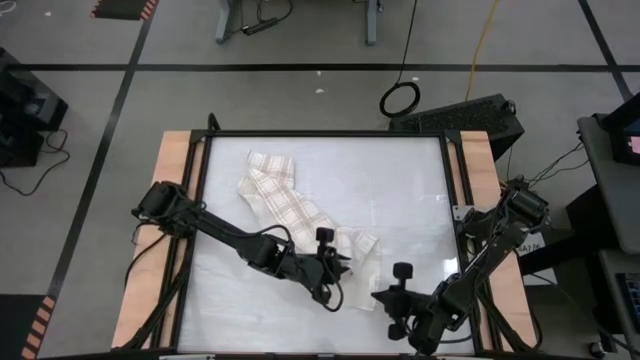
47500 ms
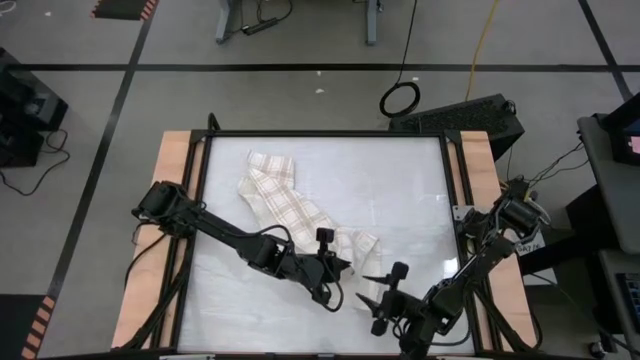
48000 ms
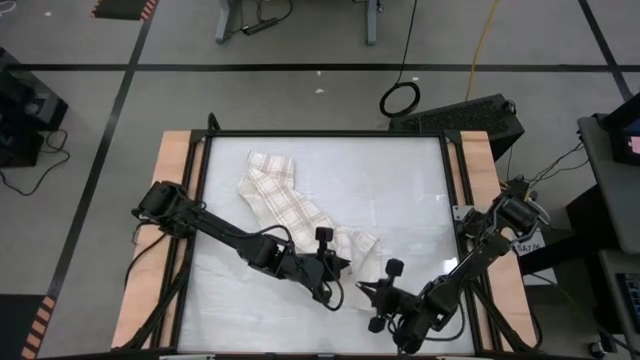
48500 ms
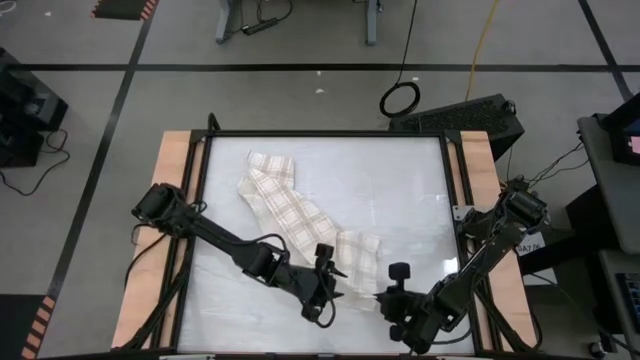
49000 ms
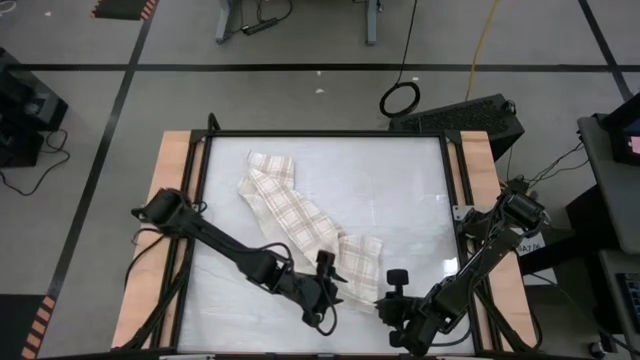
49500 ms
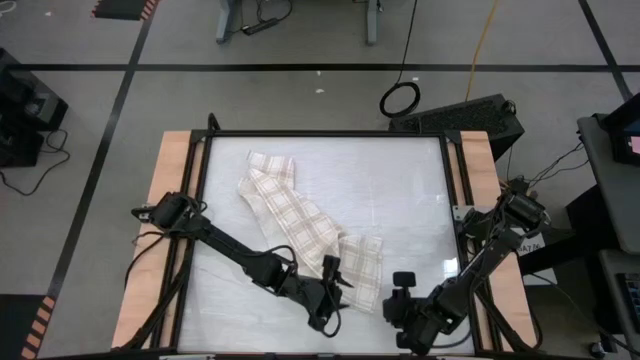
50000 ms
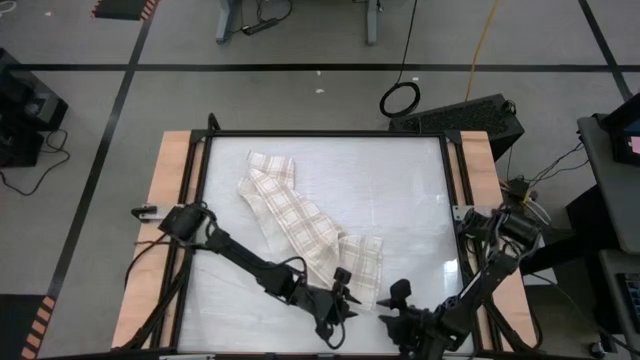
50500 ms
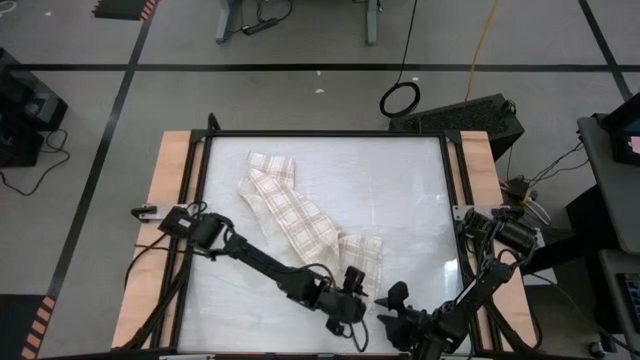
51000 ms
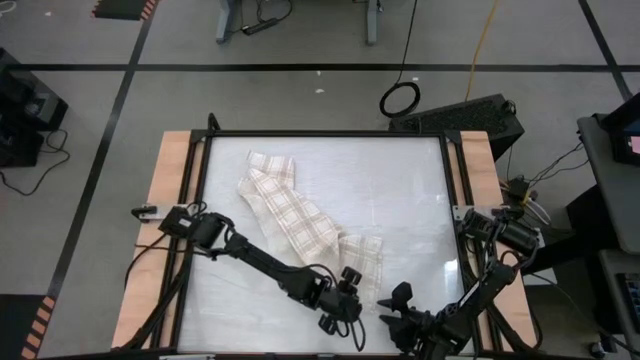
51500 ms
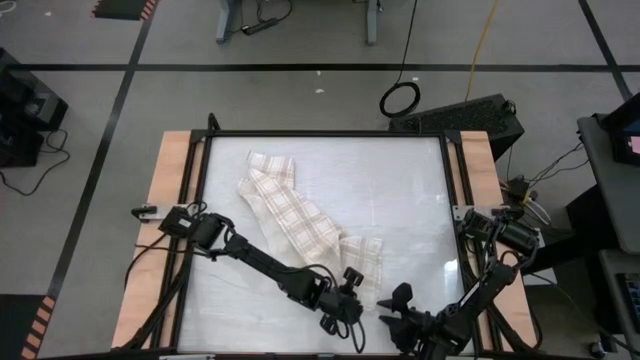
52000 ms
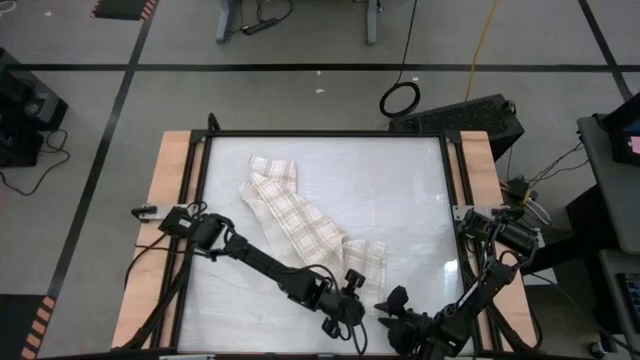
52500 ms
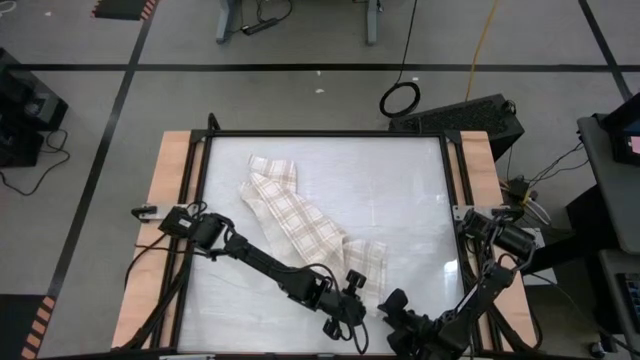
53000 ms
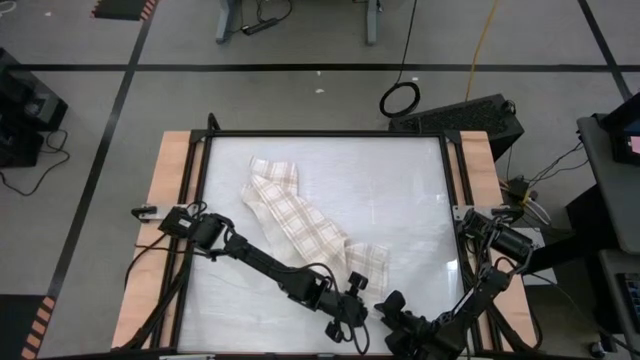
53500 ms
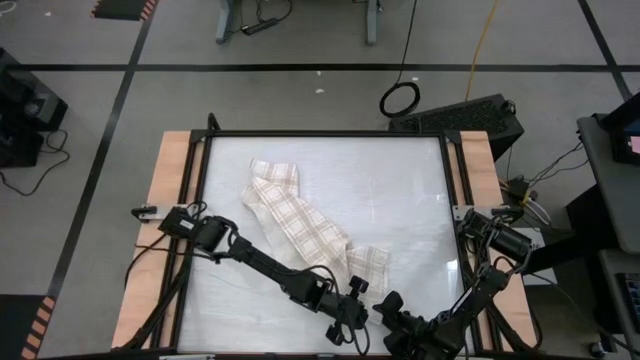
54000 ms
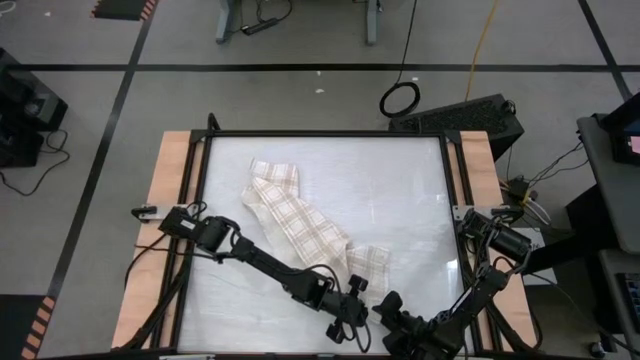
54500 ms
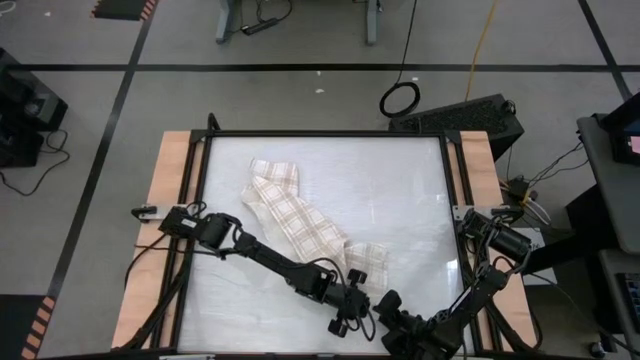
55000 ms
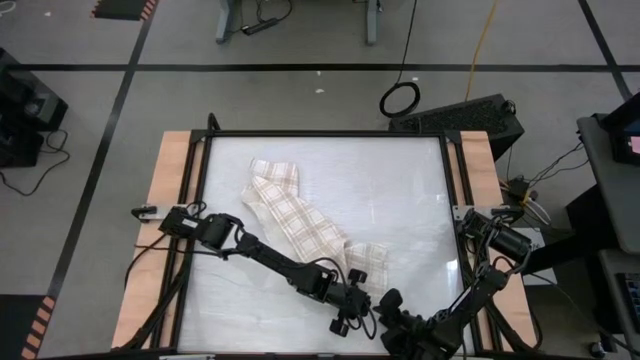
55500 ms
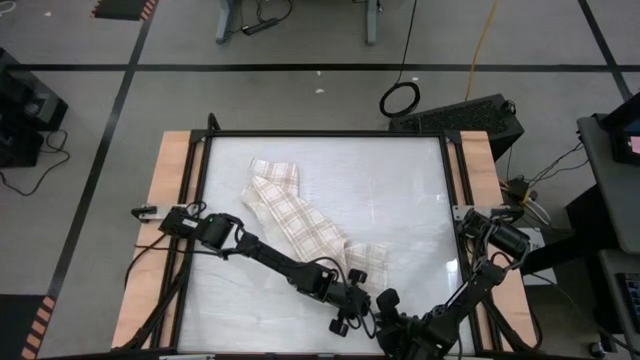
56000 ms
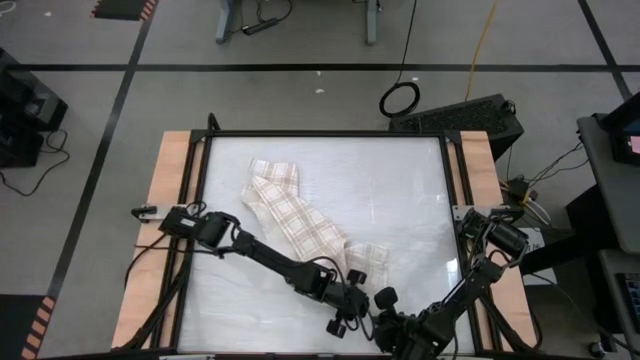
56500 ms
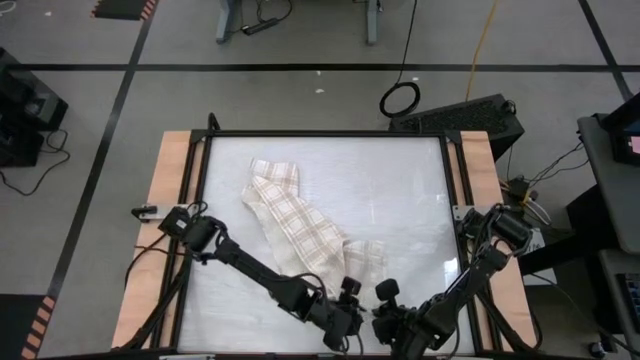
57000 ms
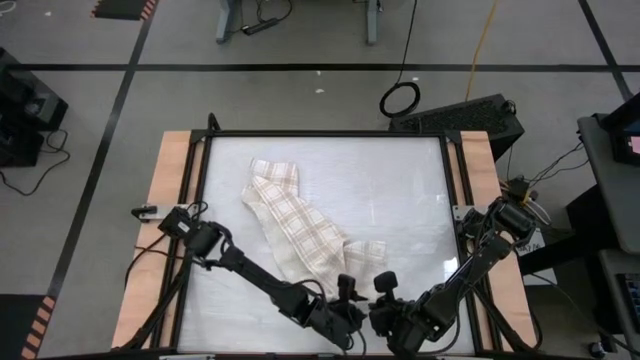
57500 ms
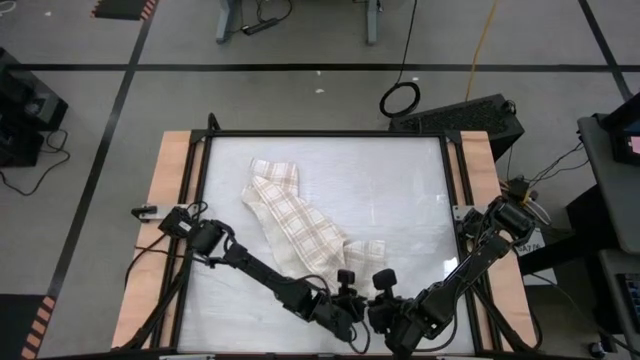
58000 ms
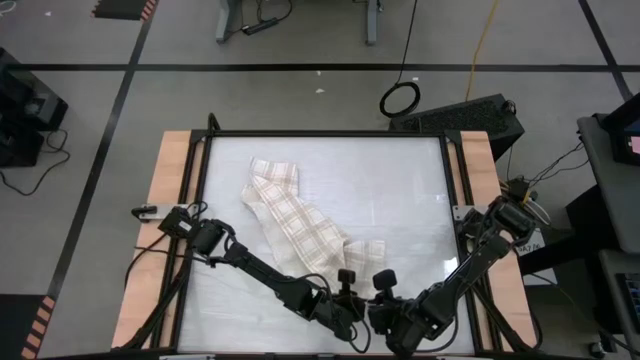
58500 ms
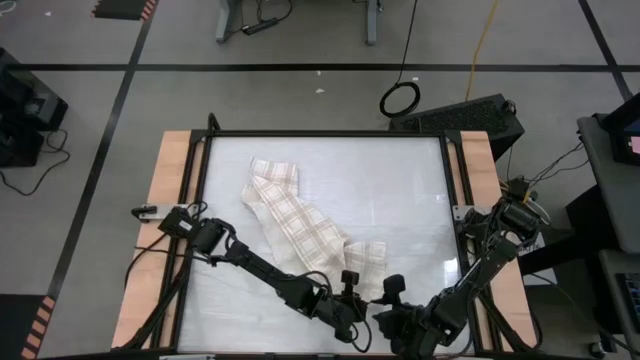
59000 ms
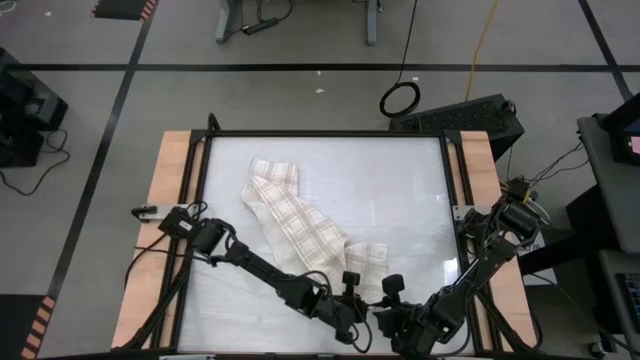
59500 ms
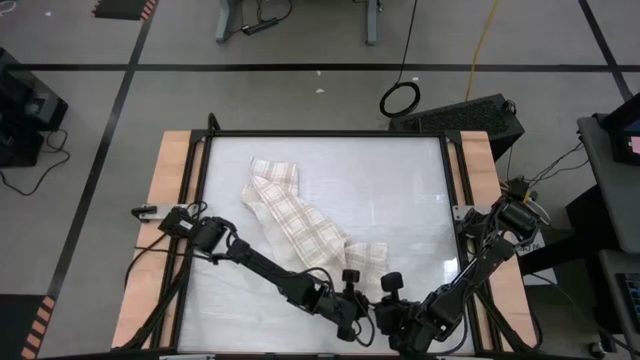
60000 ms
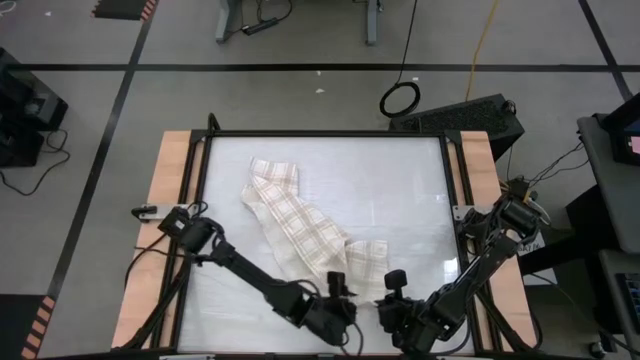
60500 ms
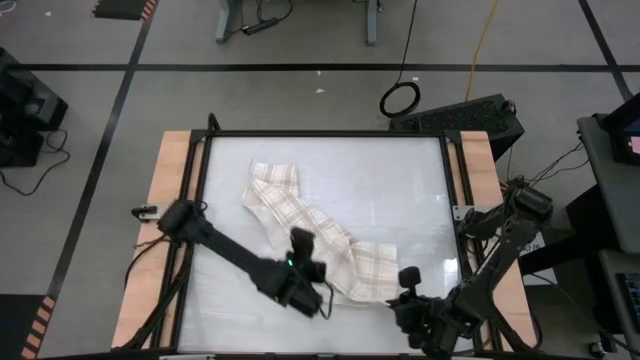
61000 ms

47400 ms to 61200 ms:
Task: Roll towel
Roll the white-brown patterned towel

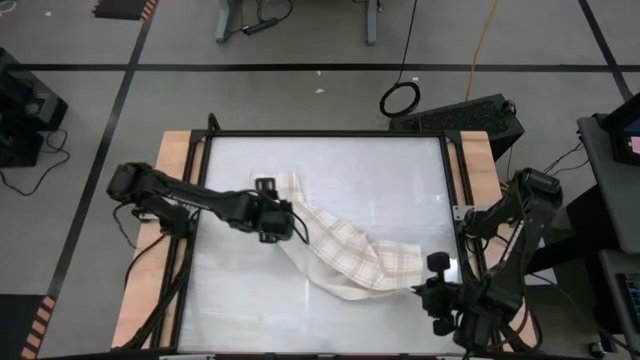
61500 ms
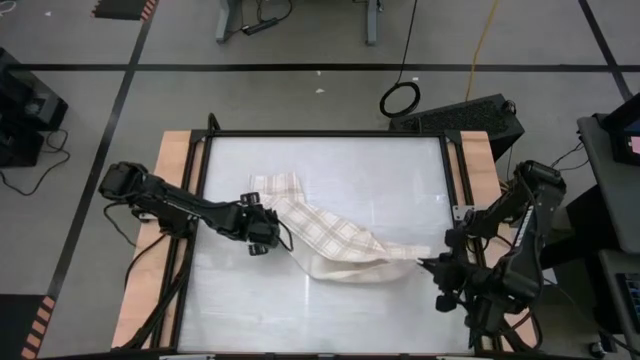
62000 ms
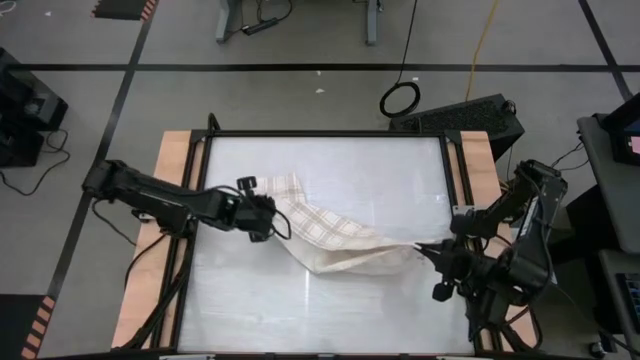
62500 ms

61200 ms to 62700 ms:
Roll the white-brown patterned towel

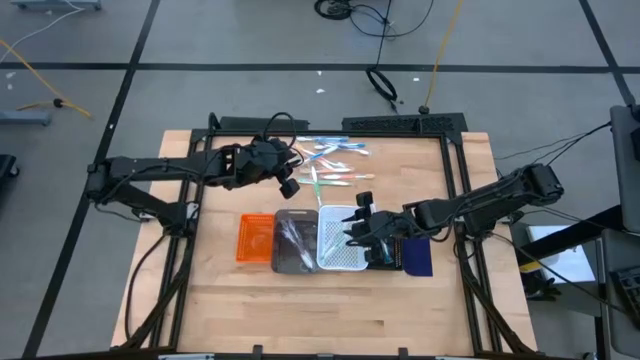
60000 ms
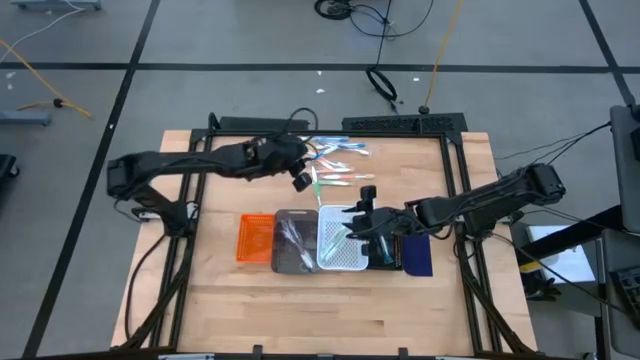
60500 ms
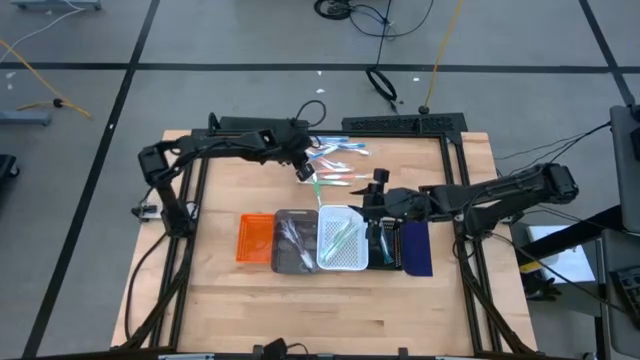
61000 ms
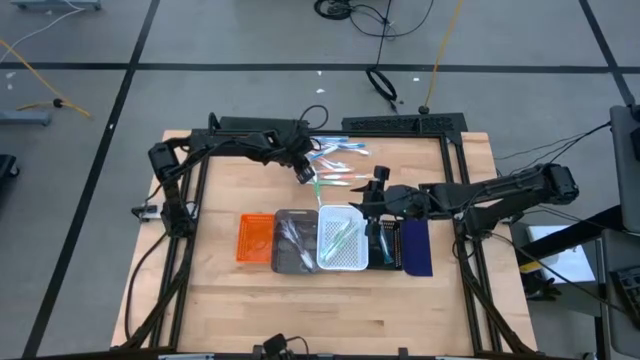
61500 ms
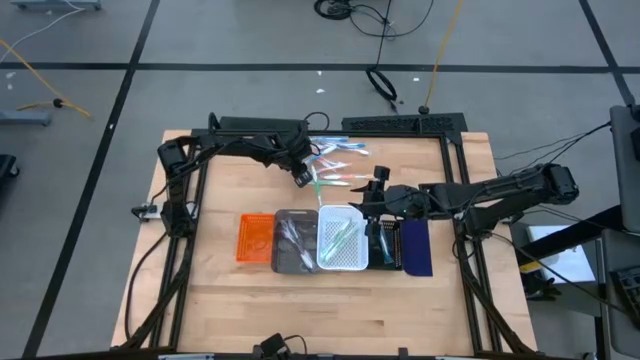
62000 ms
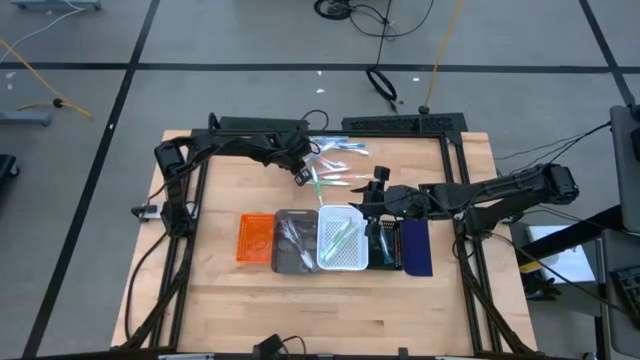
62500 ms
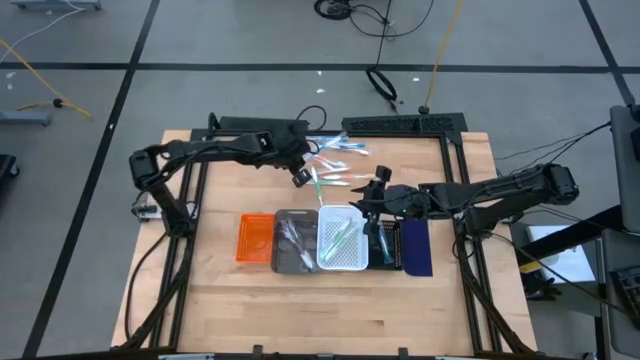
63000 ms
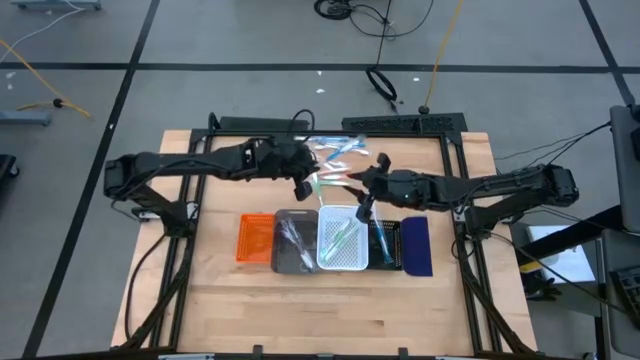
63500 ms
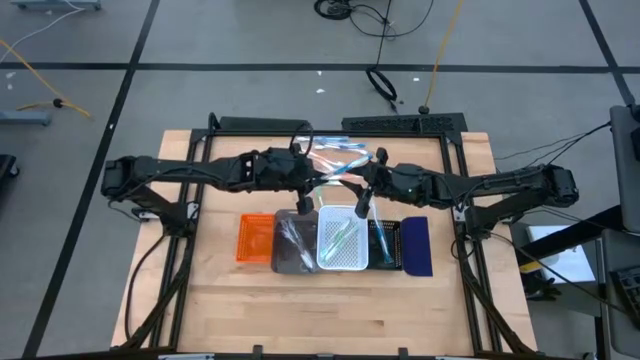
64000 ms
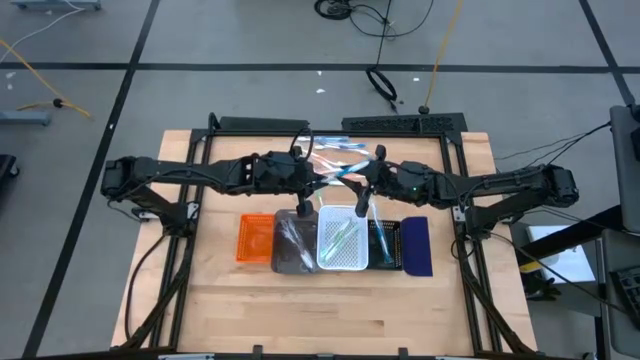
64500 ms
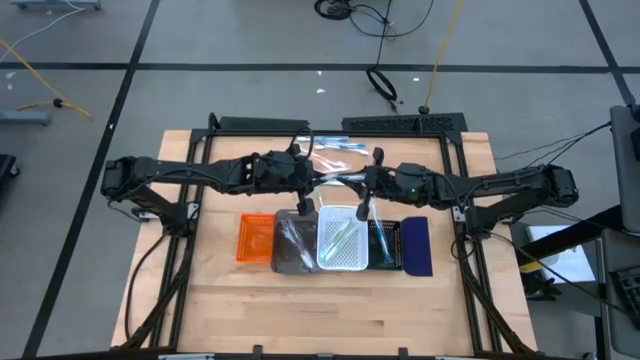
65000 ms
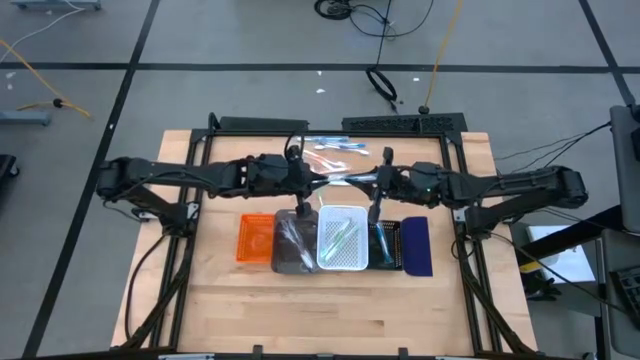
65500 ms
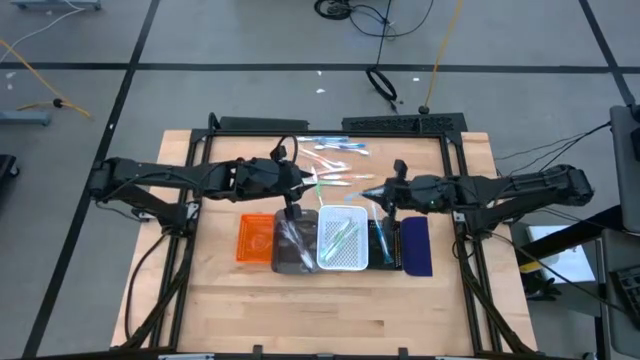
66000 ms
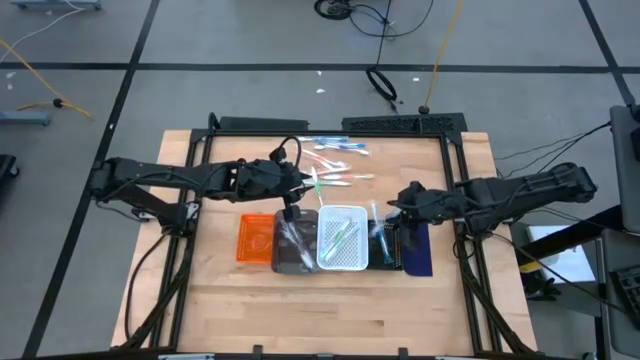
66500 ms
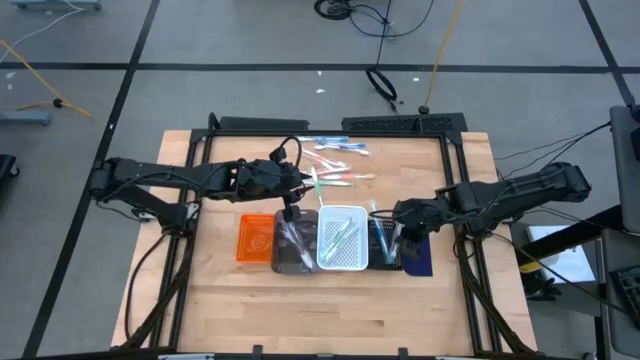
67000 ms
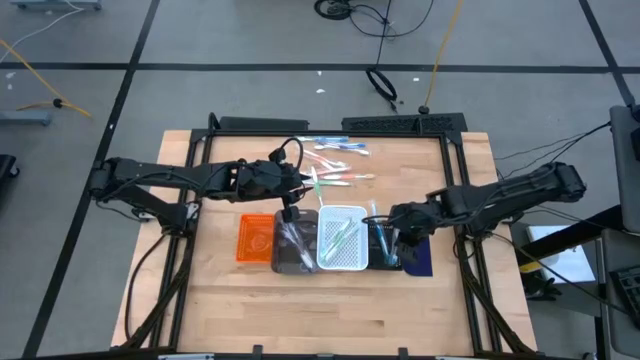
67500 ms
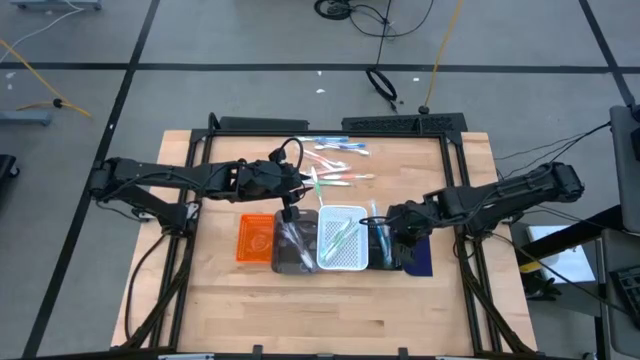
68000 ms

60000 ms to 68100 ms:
Task: Pick & Place Toothbrushes
Put the blue toothbrush into the right black bin
